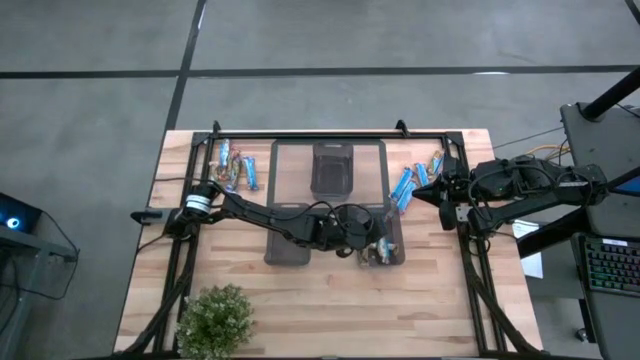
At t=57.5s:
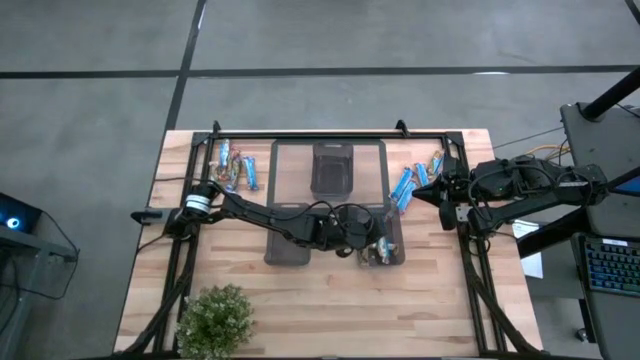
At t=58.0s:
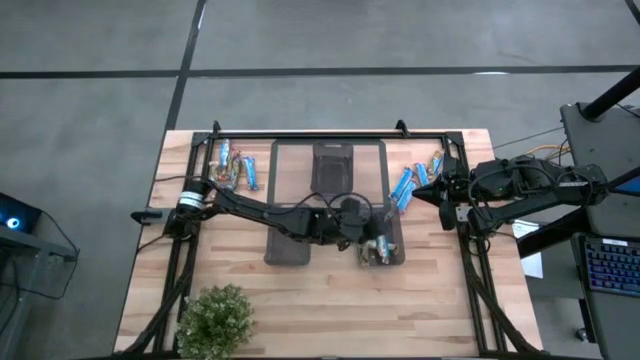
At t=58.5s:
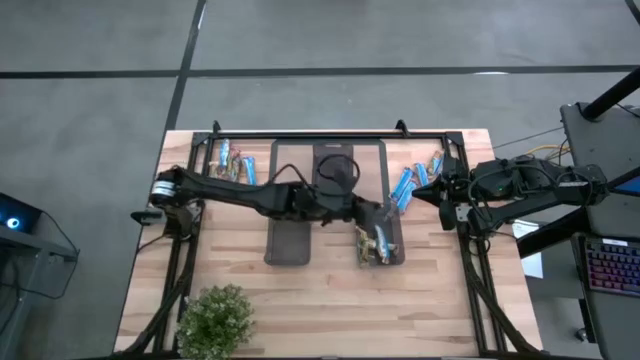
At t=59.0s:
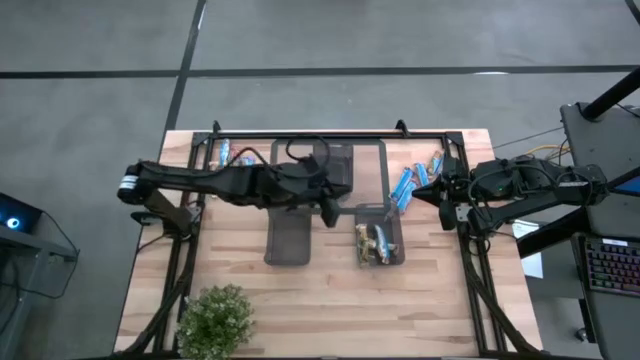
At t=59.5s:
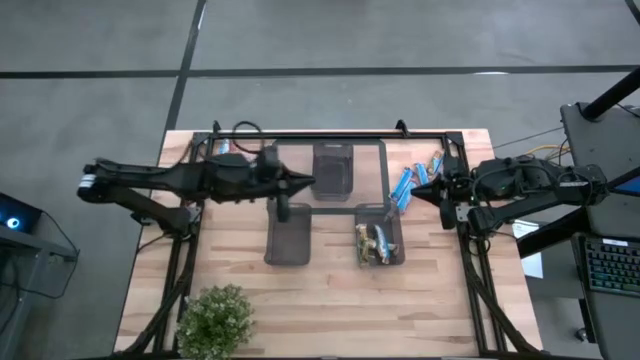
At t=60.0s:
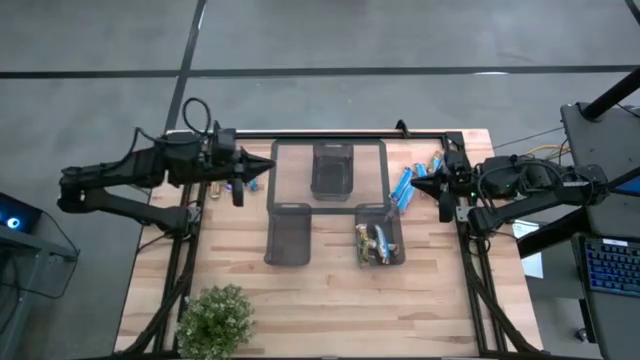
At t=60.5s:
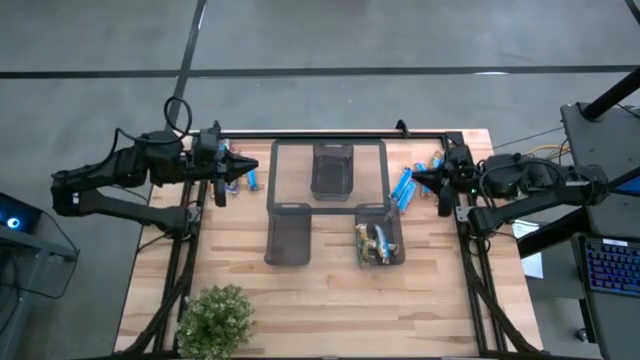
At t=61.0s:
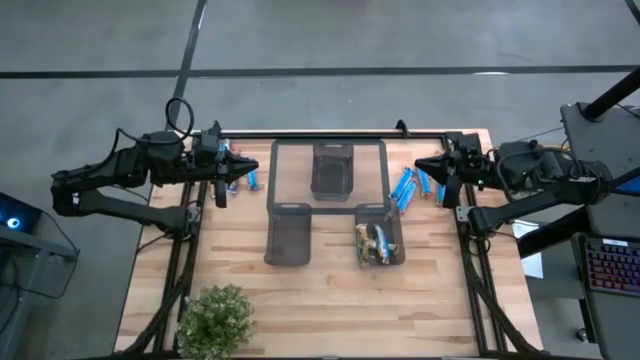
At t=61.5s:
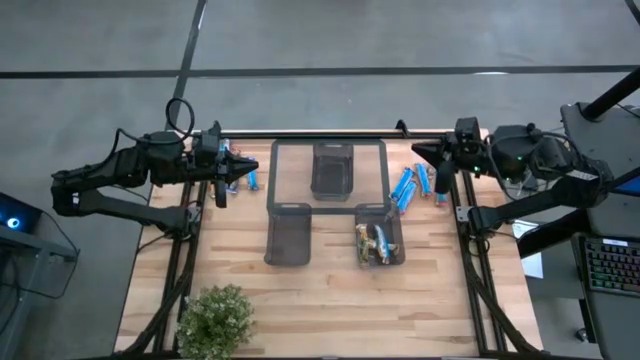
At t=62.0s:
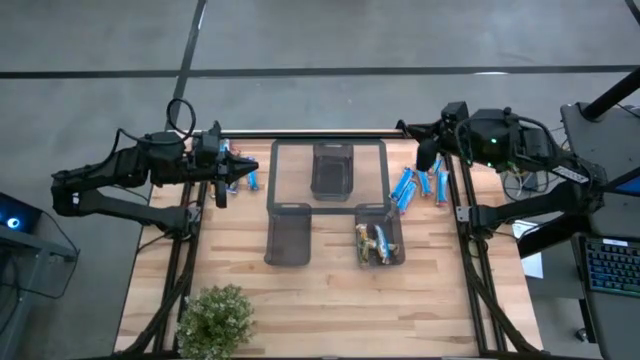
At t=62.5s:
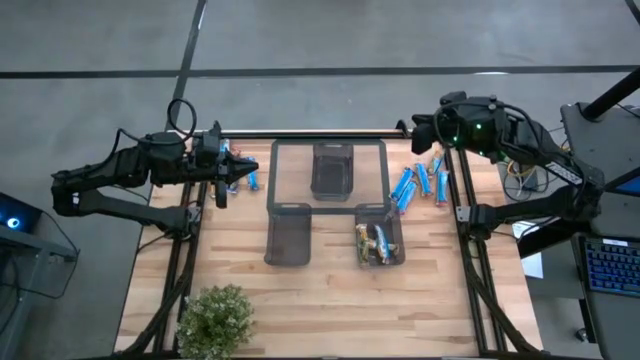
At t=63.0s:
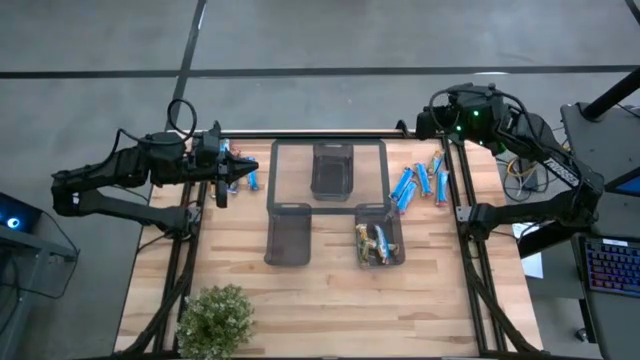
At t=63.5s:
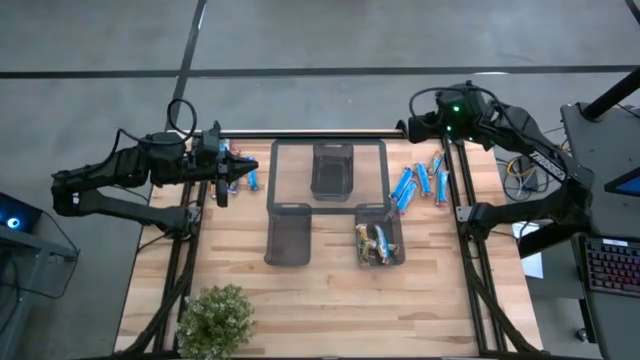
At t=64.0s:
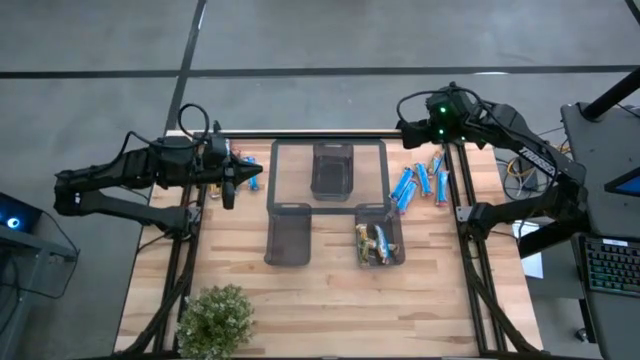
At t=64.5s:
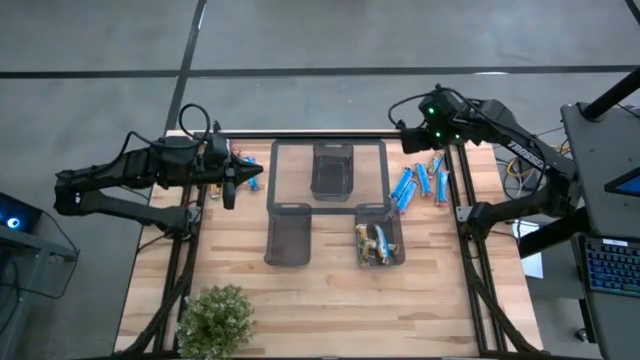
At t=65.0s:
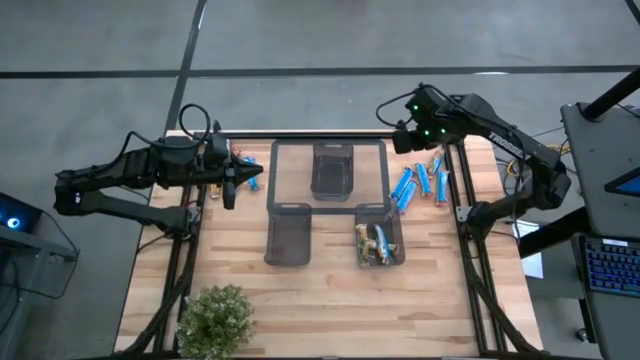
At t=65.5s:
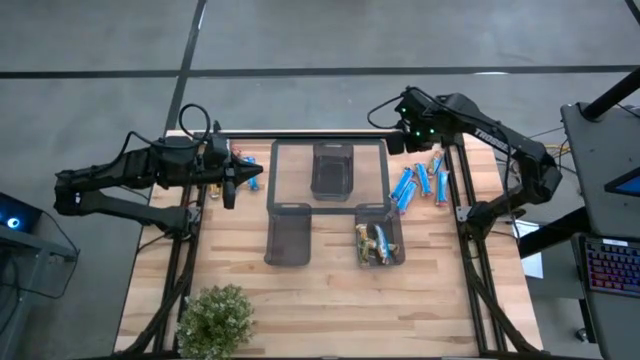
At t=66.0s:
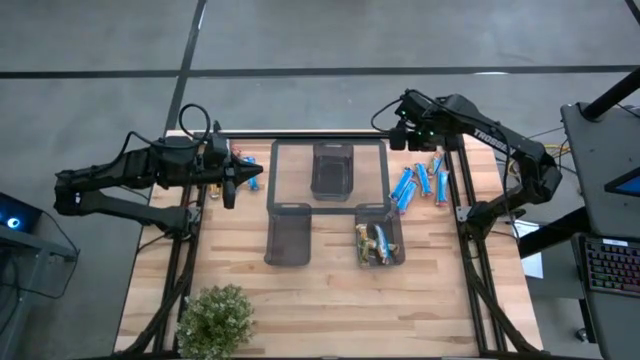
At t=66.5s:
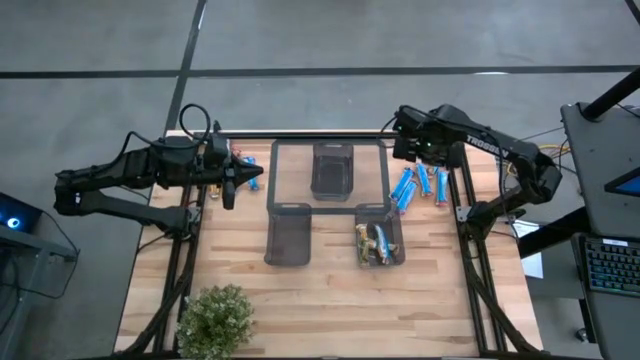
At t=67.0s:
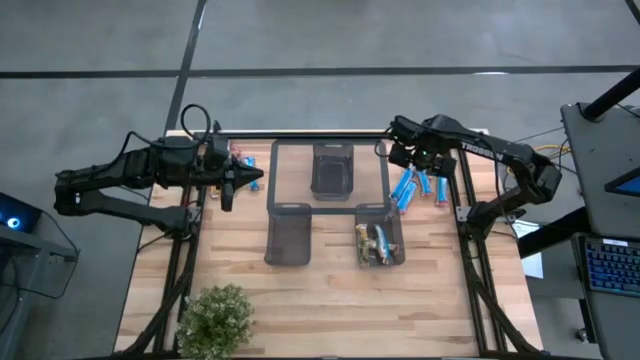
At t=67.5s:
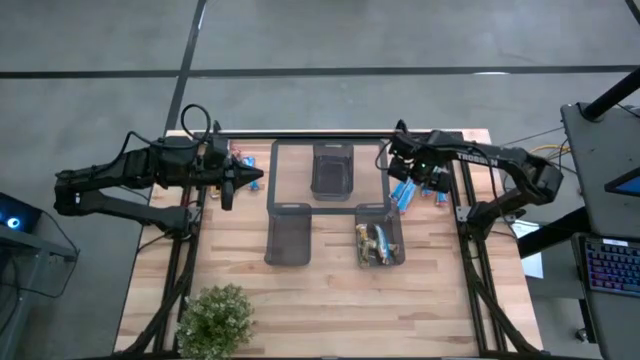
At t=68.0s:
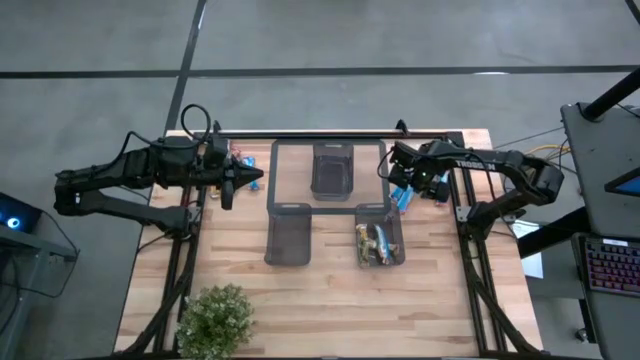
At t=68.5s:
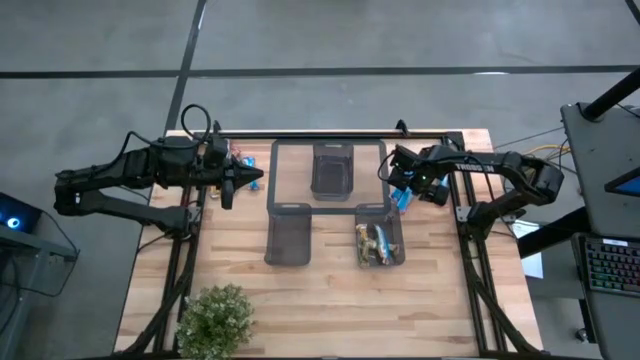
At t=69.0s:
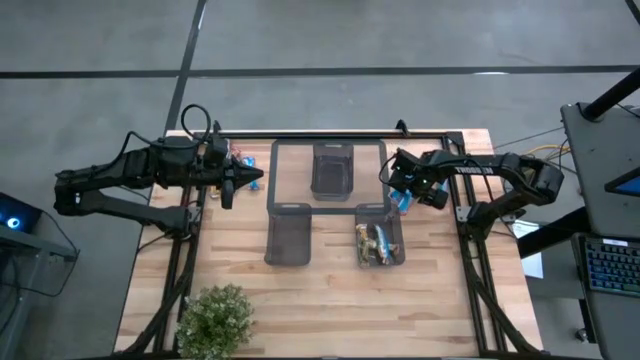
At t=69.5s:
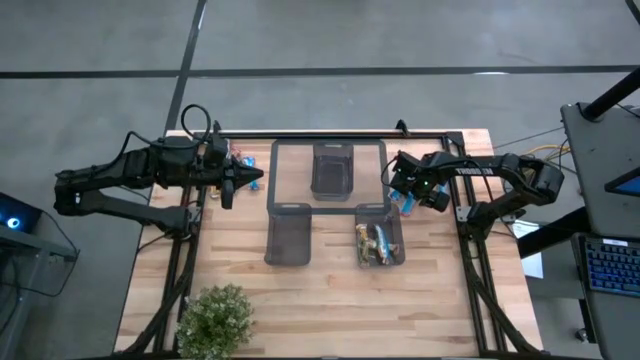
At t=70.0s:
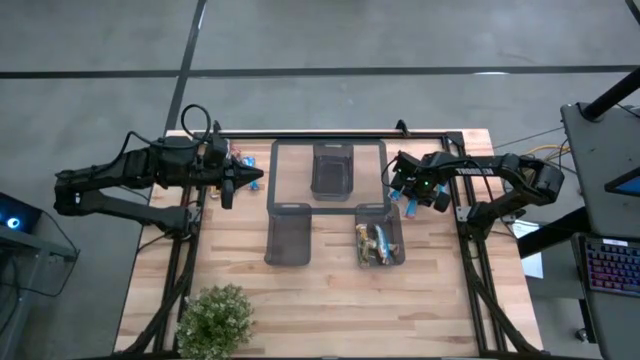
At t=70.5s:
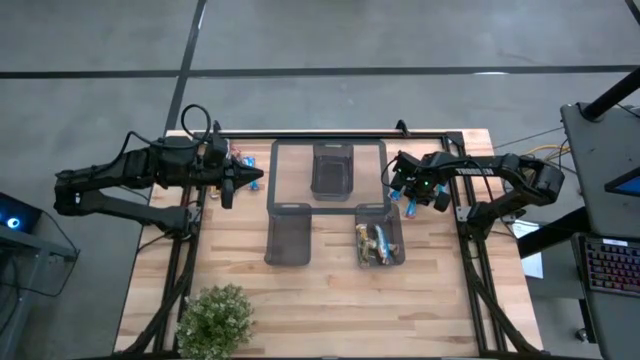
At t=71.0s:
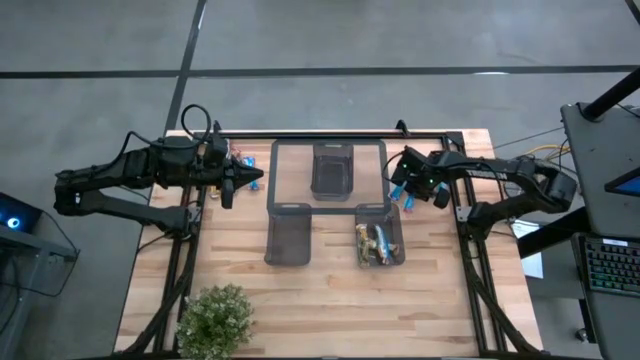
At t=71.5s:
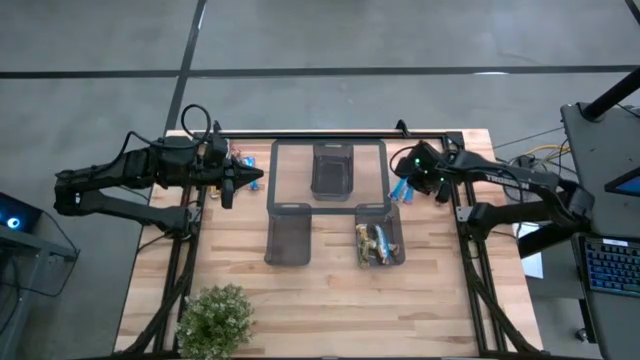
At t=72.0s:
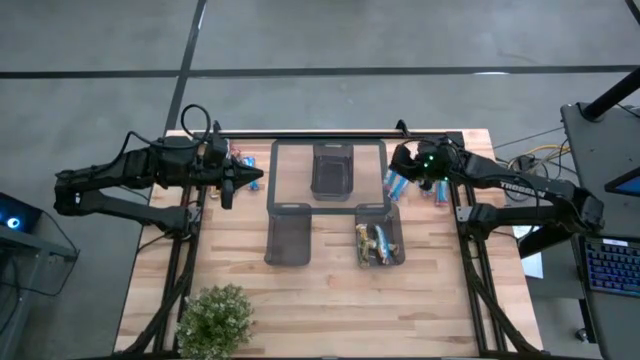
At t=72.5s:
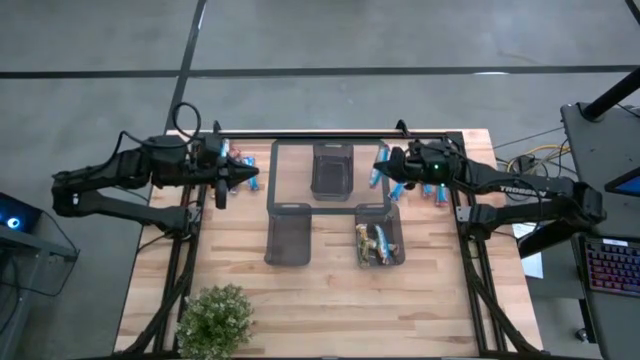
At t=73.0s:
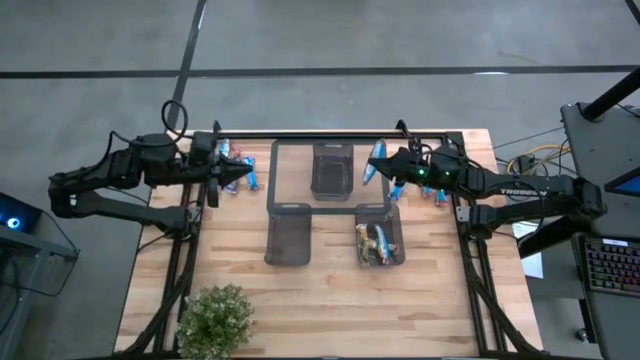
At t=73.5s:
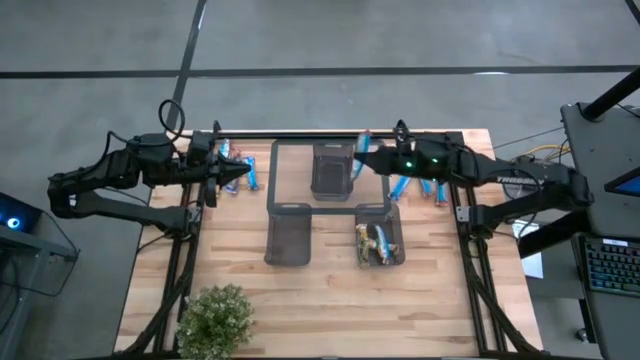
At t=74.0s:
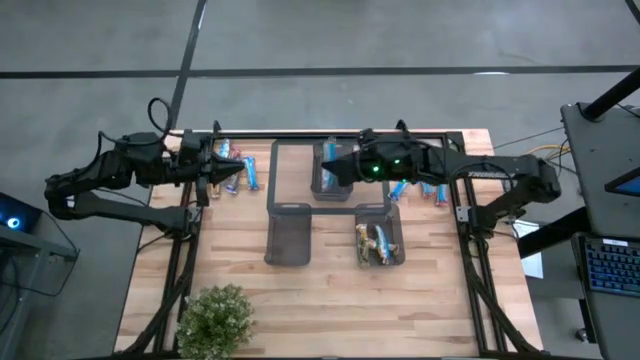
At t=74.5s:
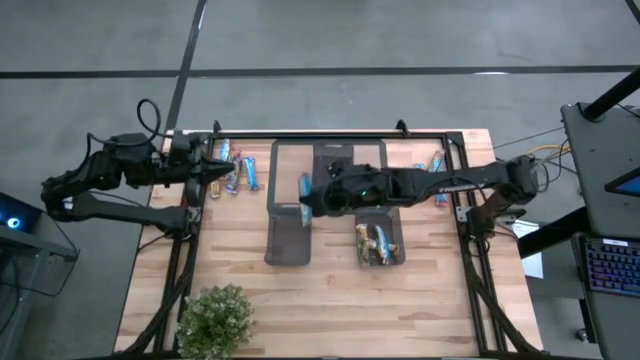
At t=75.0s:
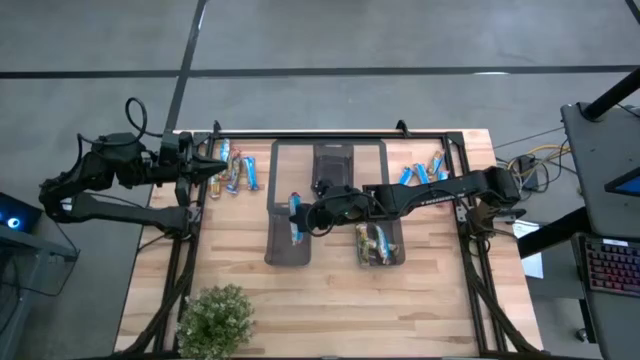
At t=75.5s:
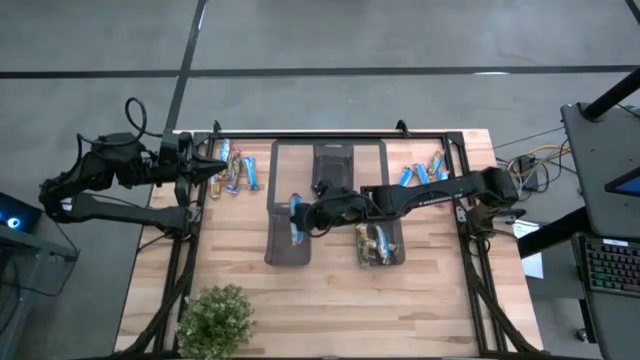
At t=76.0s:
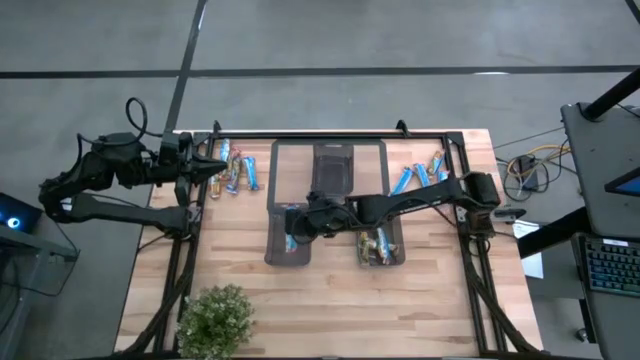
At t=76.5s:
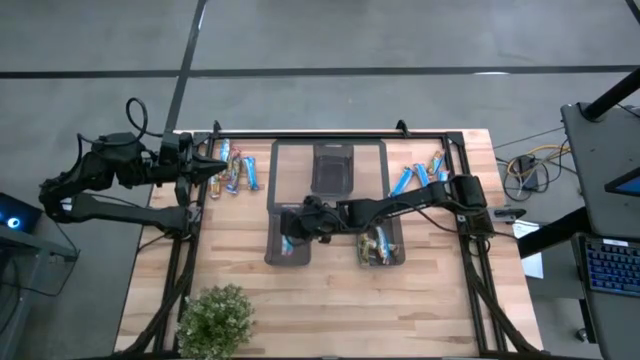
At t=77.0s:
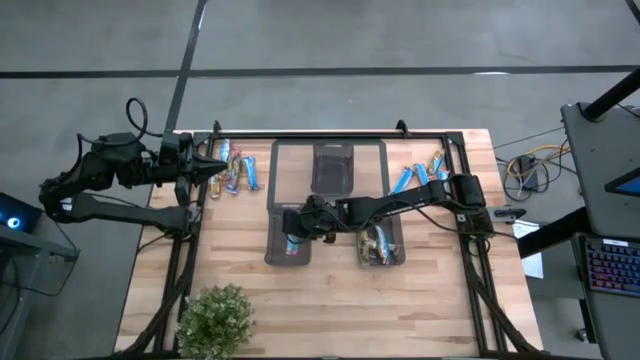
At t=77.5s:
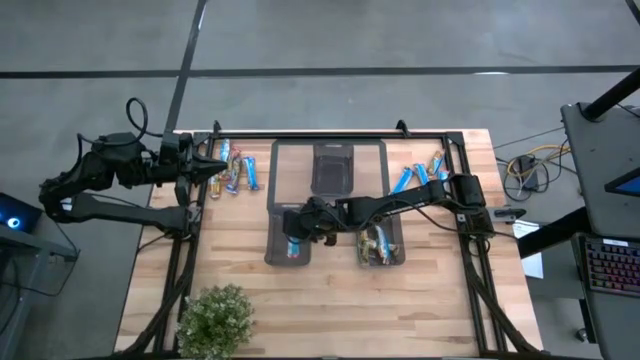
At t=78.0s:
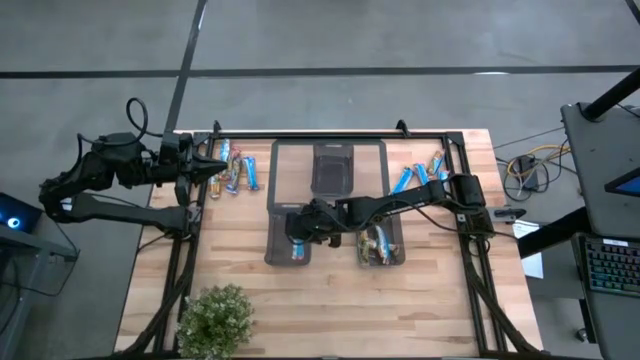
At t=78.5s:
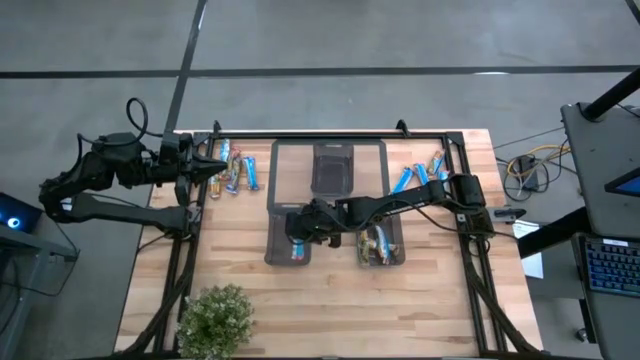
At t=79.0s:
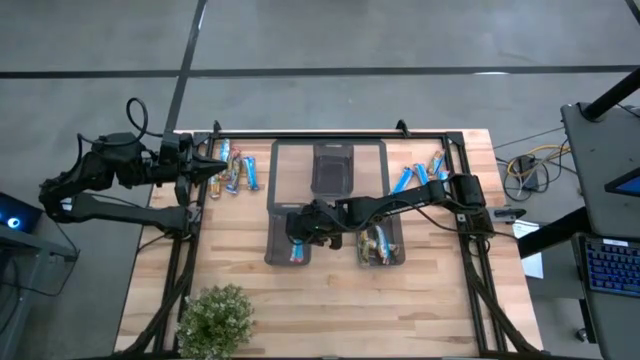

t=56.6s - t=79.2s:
Task: Pick and place Granola Bars by type
Put the red granola bar into the bottom left black bin
